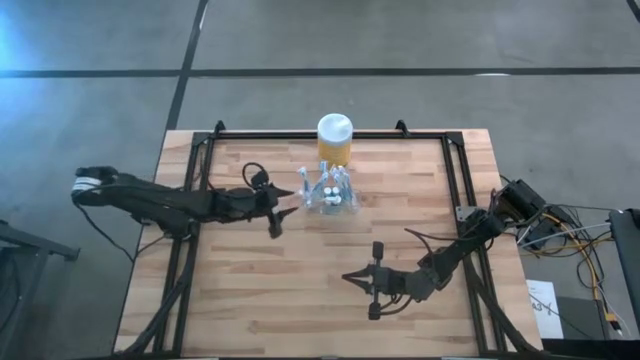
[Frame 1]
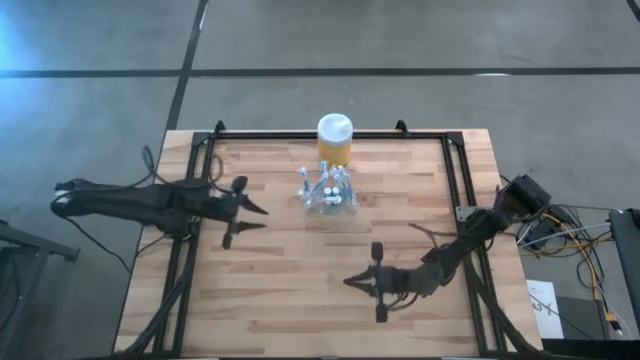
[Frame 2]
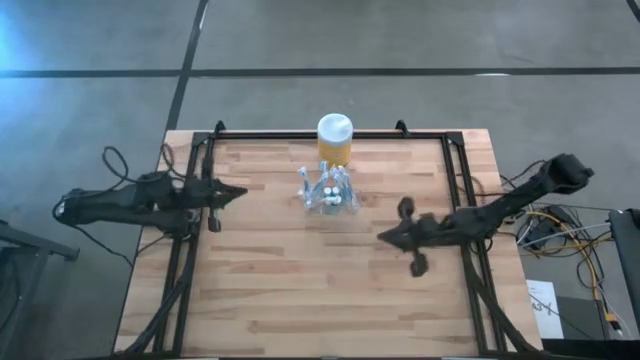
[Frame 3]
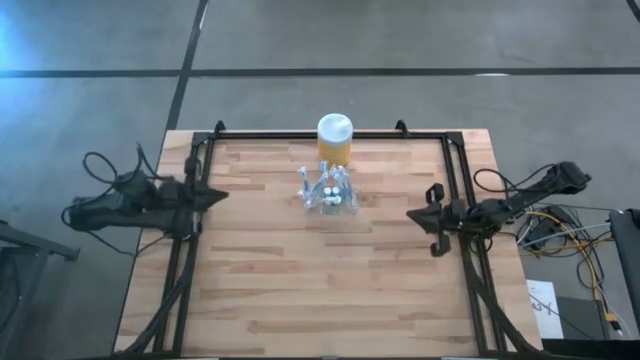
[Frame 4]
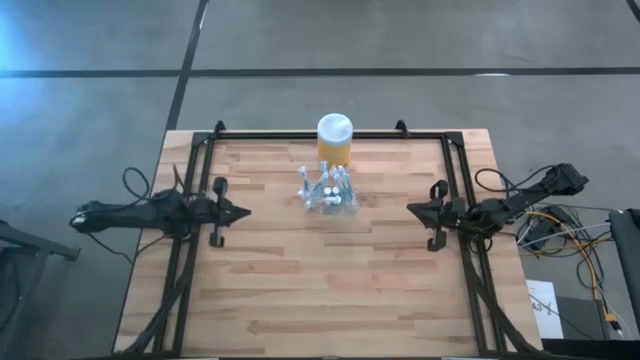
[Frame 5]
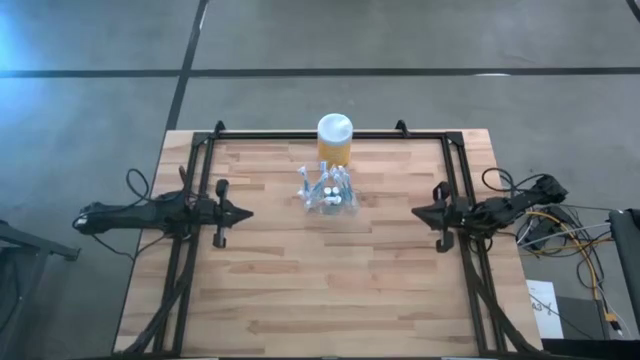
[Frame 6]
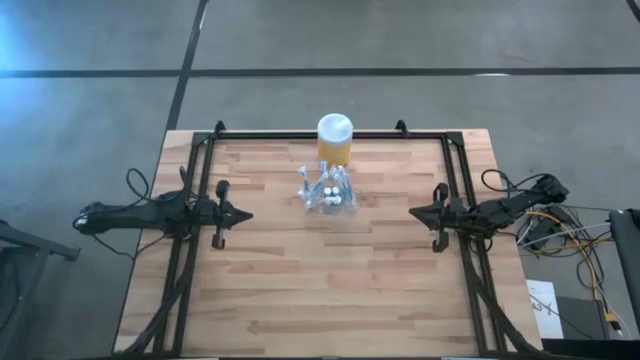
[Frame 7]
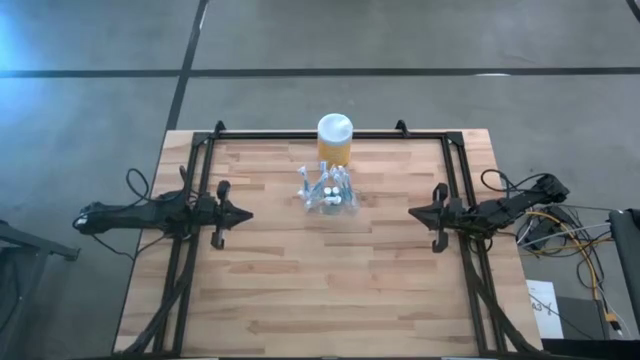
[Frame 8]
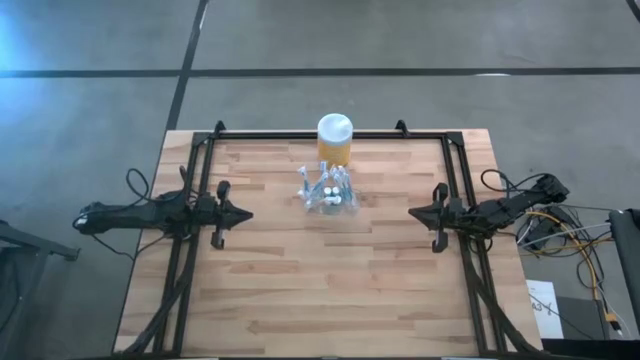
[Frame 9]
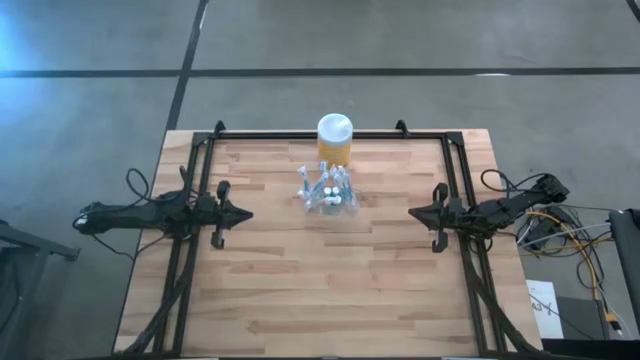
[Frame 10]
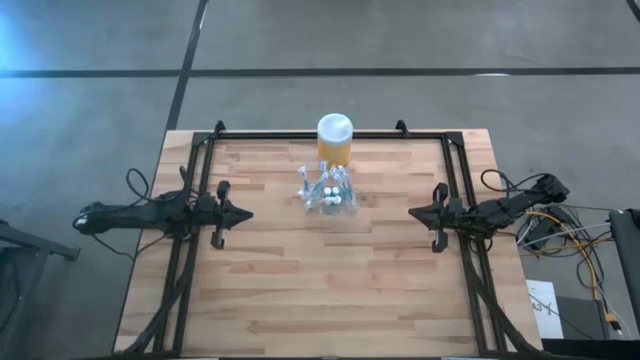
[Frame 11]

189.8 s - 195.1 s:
Task: Pick & Place toothbrushing station
Return to Home Position

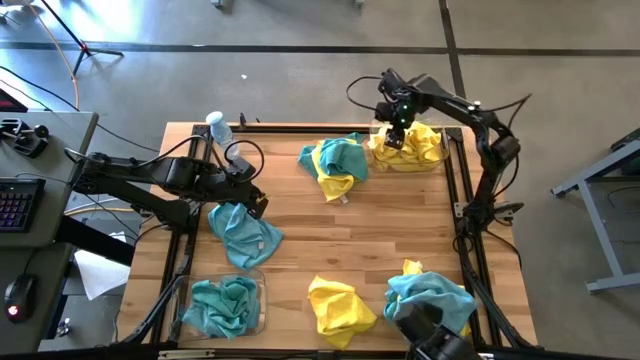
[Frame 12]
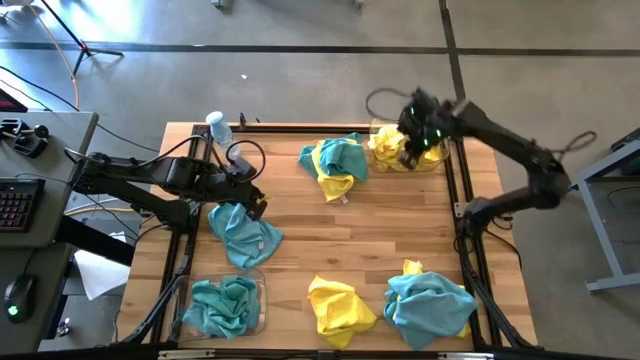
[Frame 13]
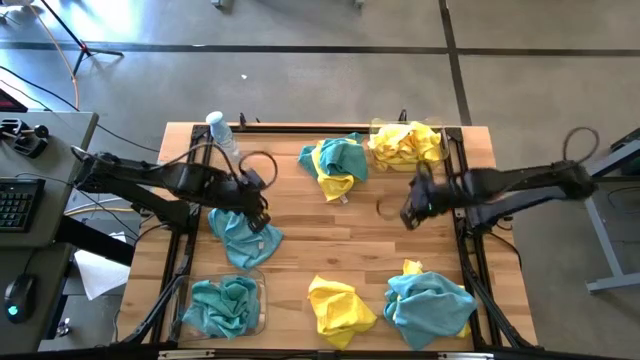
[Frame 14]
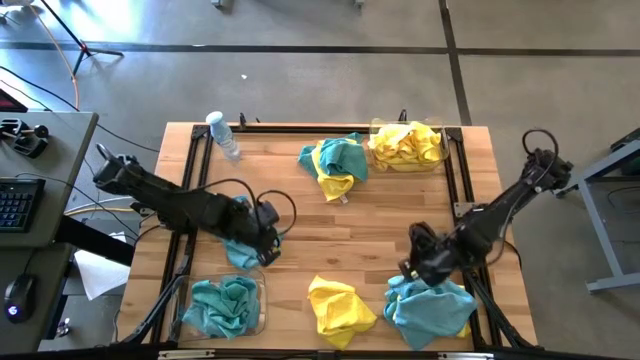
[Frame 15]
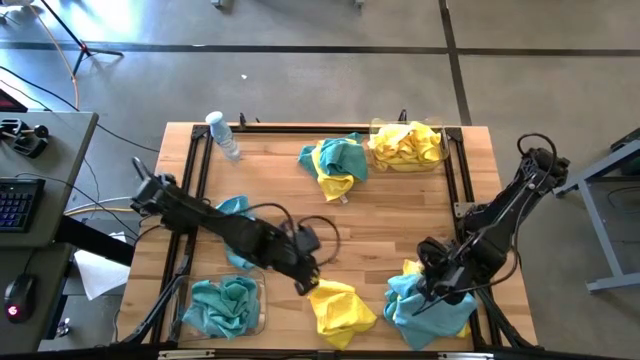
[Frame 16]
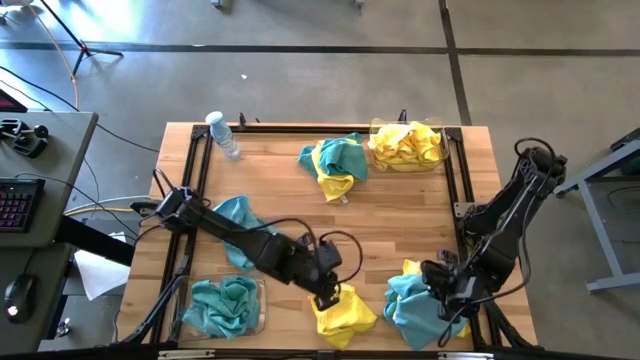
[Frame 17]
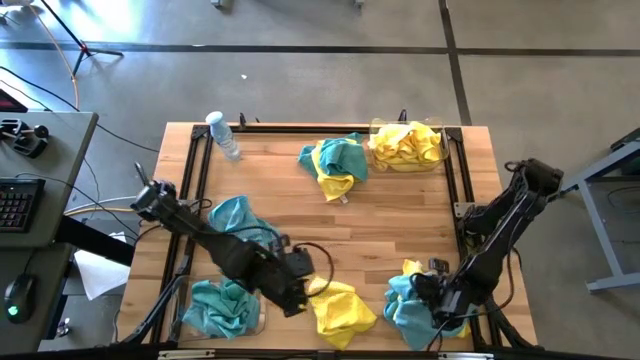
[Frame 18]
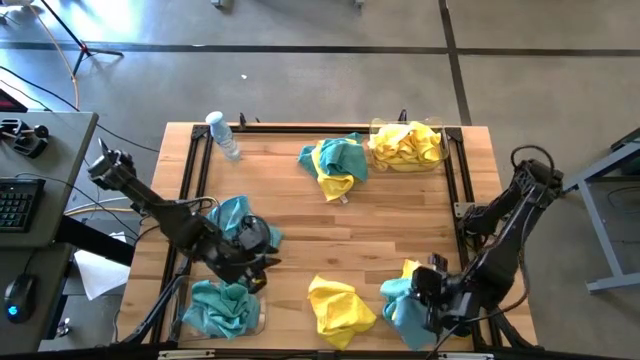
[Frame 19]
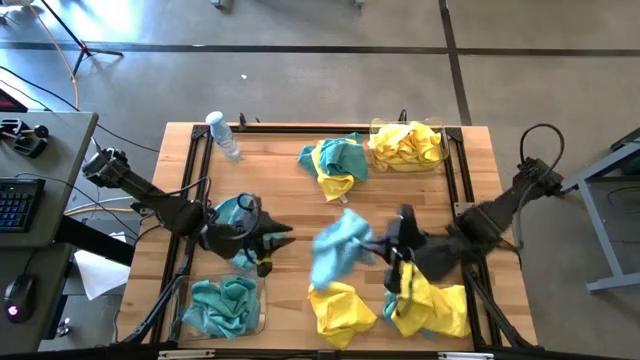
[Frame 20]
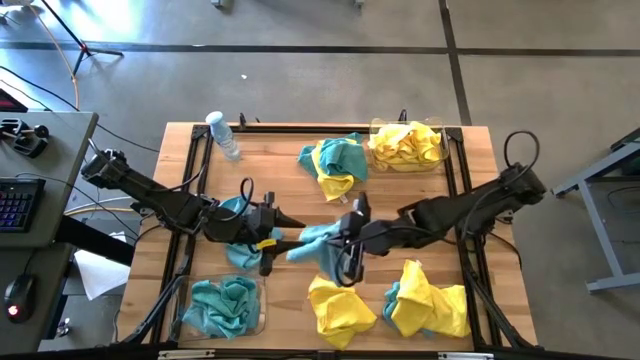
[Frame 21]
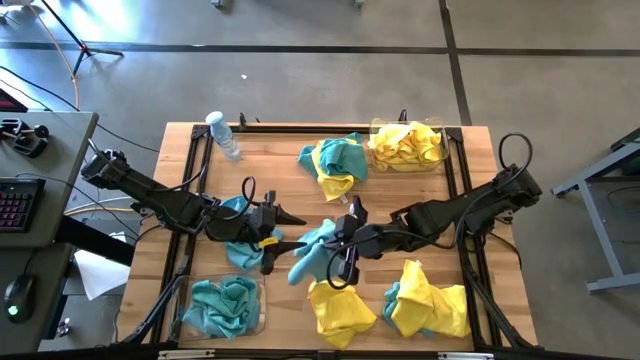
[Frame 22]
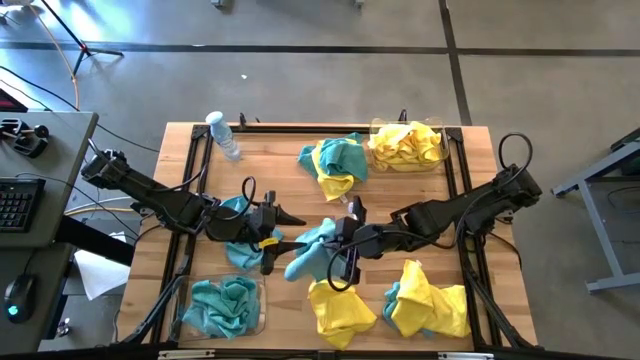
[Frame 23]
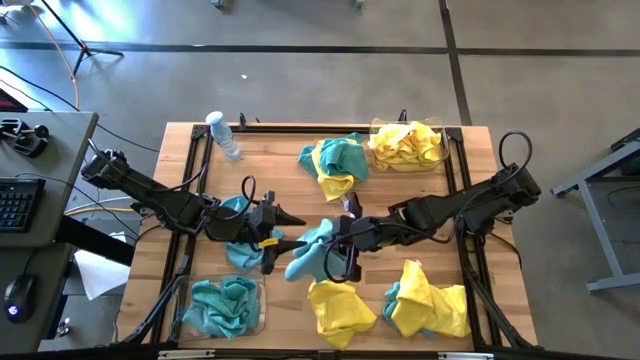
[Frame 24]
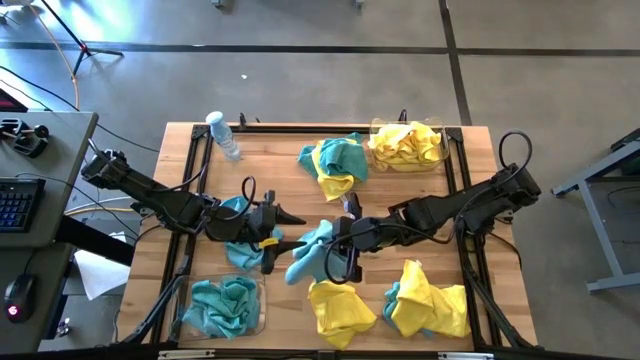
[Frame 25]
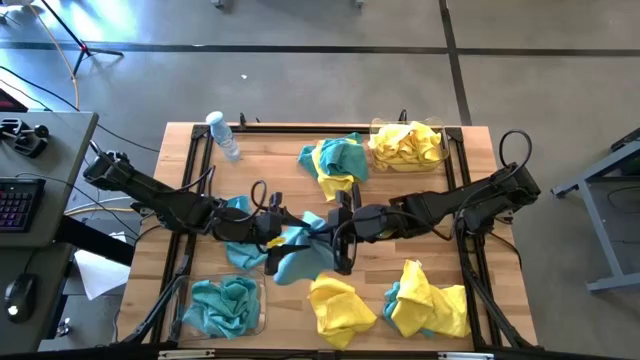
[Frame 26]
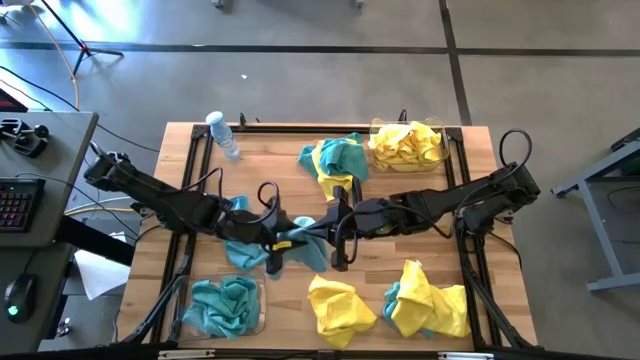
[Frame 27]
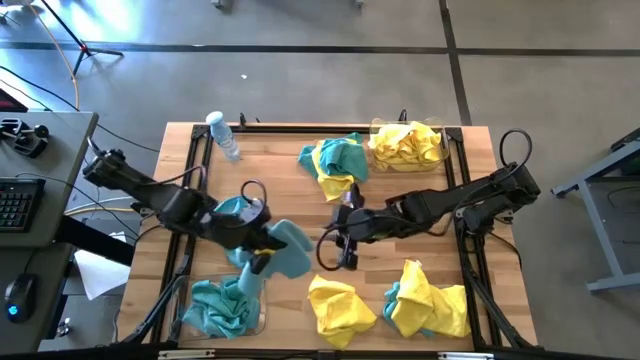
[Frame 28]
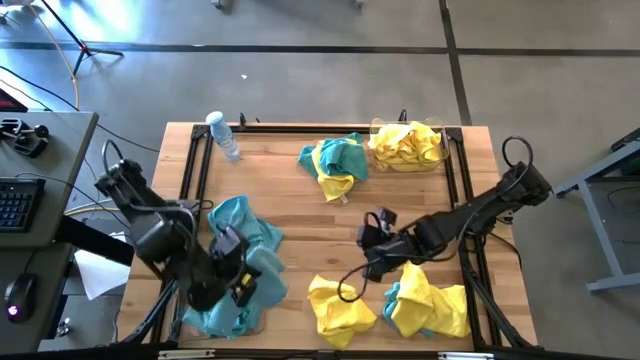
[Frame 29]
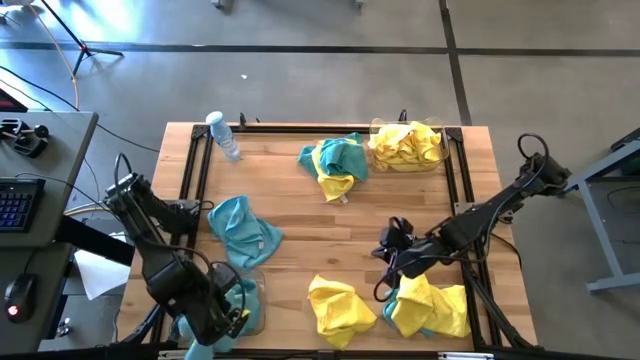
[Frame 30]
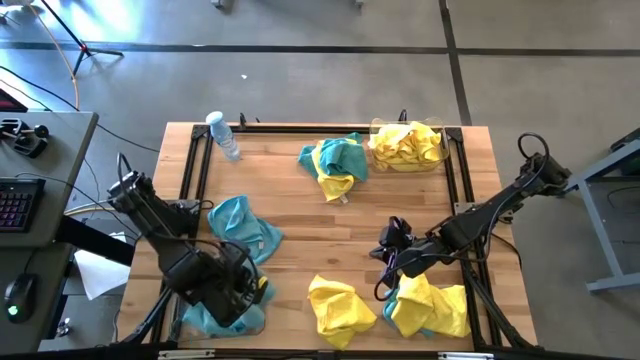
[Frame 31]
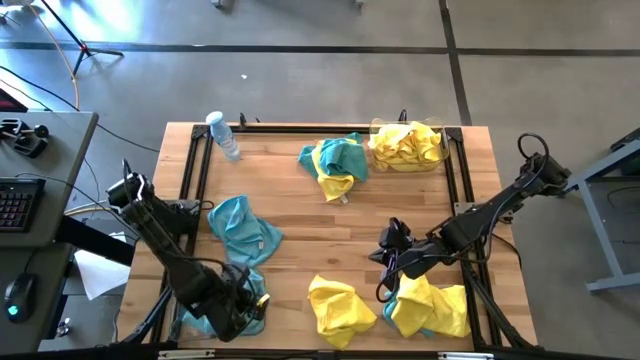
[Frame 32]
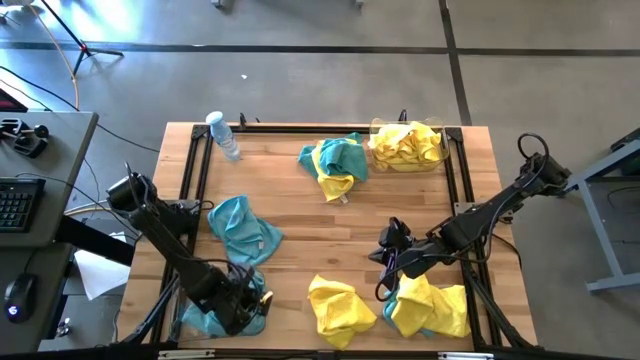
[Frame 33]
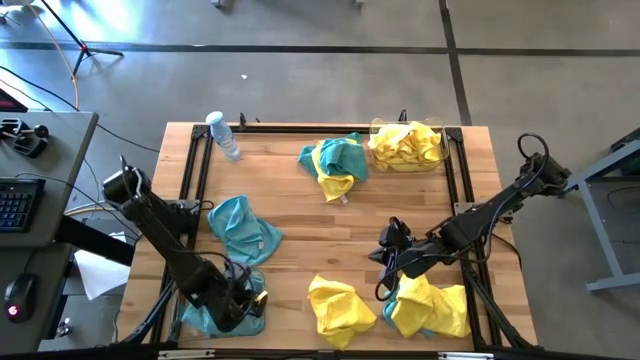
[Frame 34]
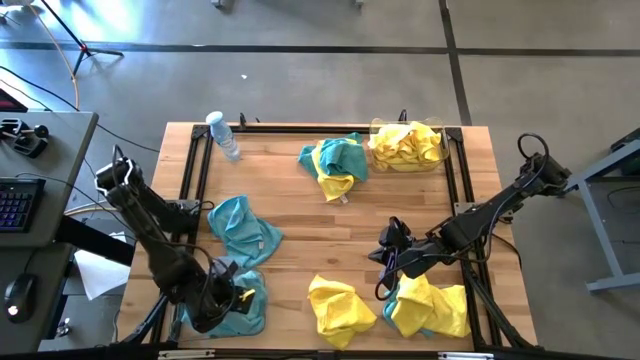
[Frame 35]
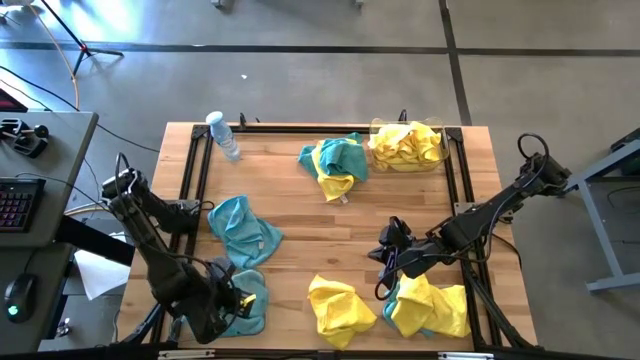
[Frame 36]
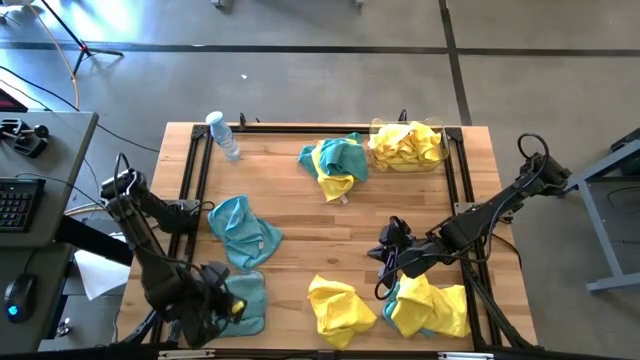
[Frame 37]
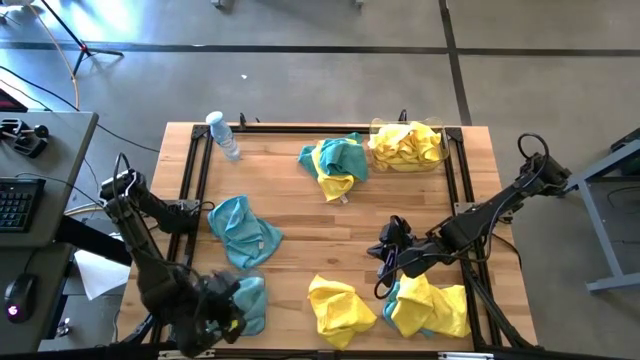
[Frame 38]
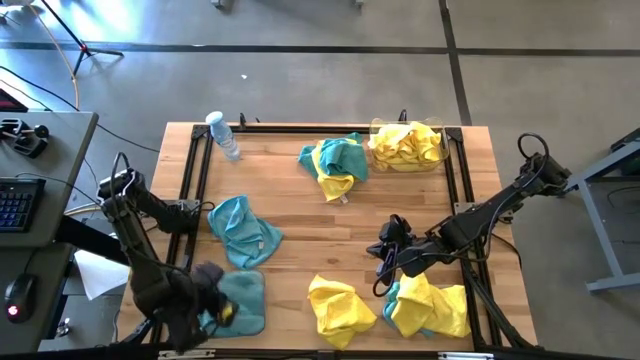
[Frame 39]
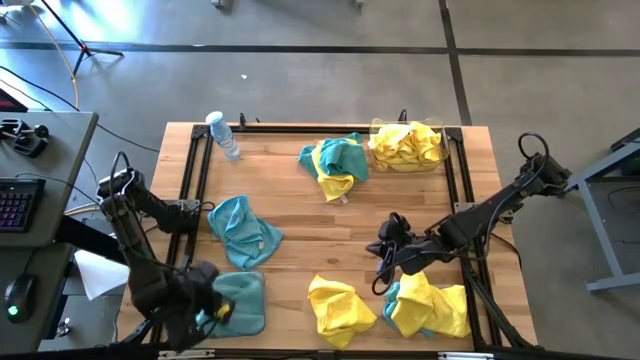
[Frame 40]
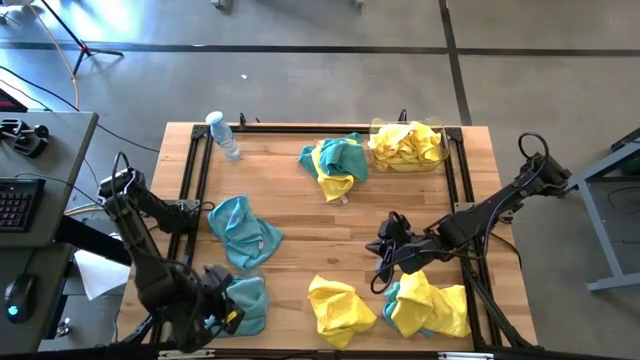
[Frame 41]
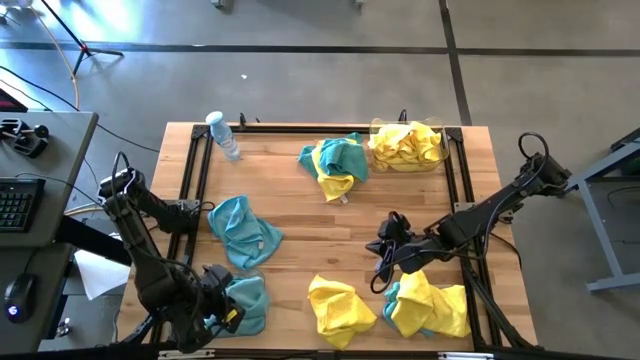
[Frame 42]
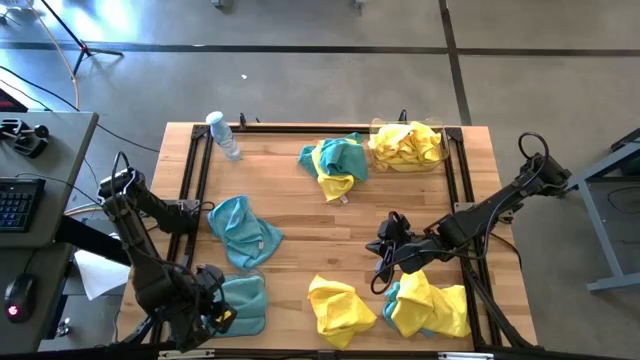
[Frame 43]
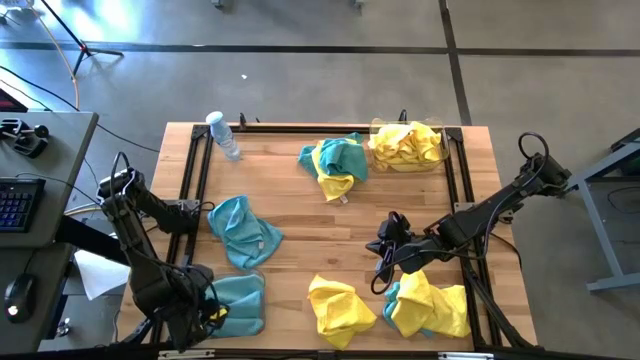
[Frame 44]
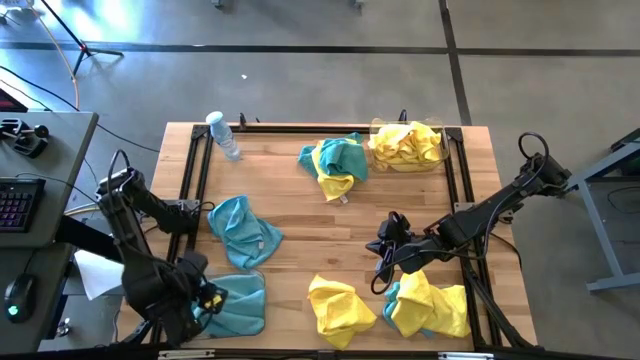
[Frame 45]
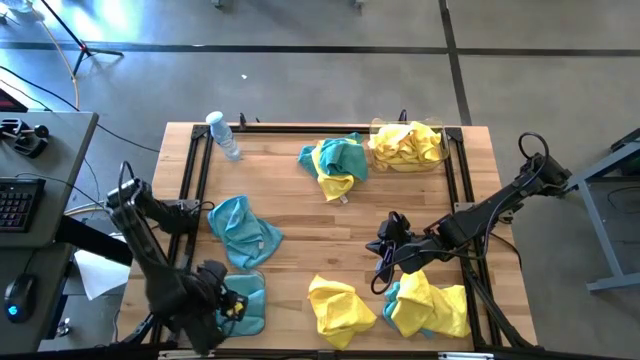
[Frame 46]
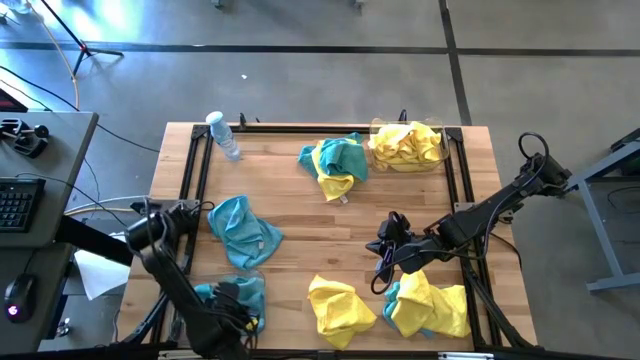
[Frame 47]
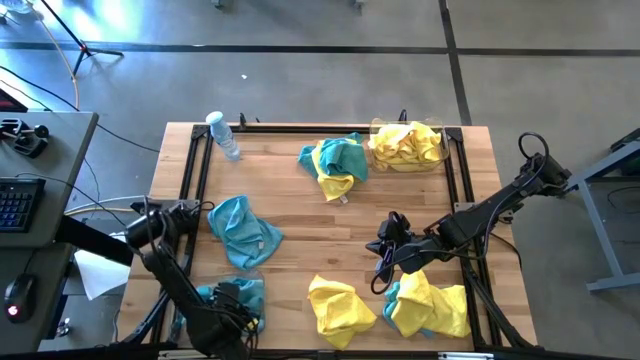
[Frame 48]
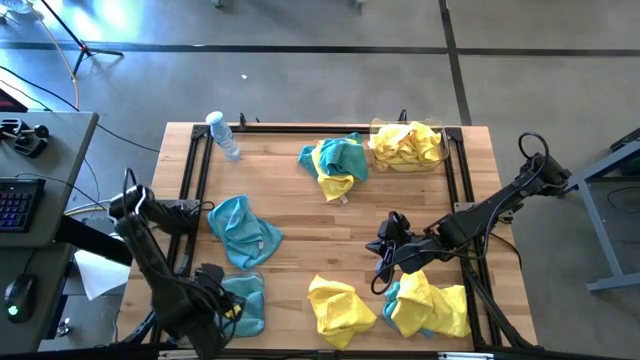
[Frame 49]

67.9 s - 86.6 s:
Task: Sort microfiber towel by color & place in baskets
Put the blue microfiber towel into the bottom transparent bin
